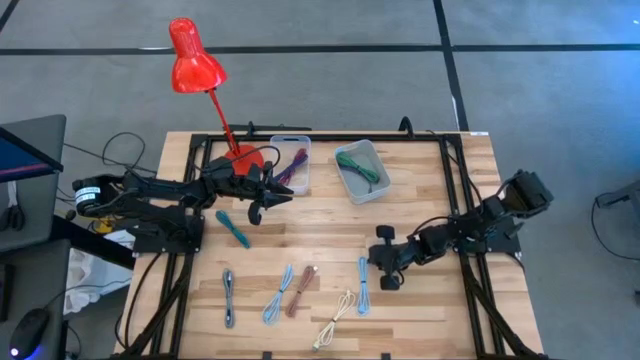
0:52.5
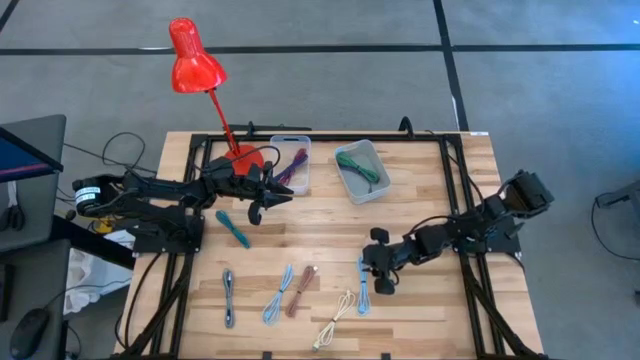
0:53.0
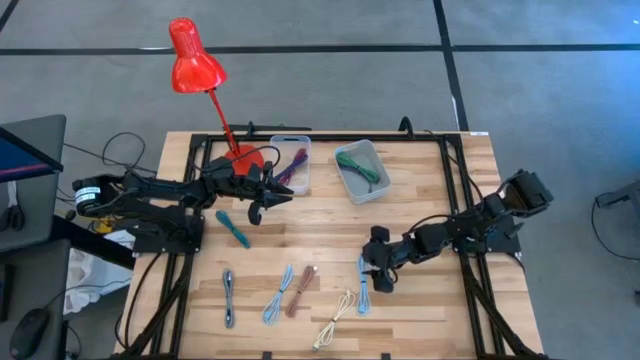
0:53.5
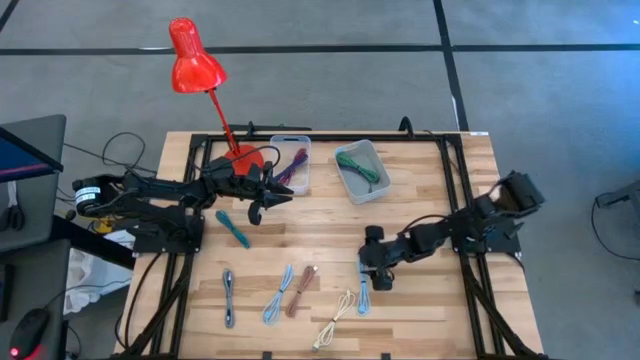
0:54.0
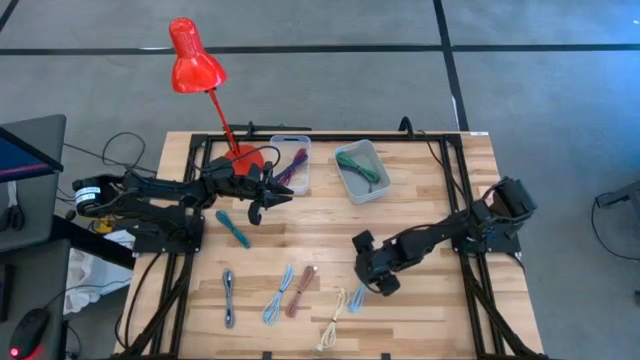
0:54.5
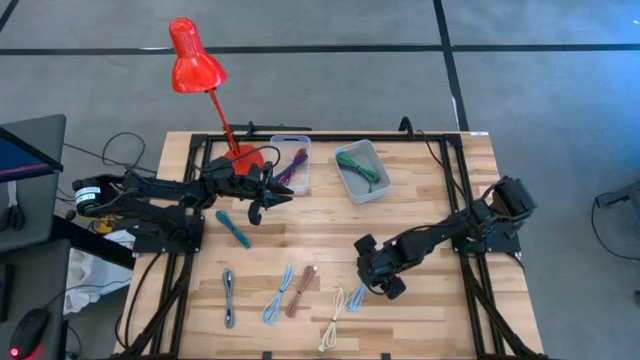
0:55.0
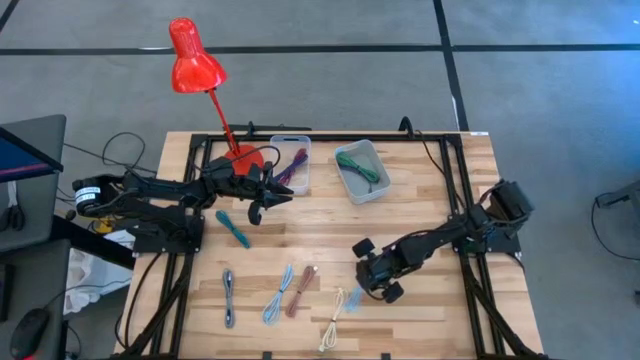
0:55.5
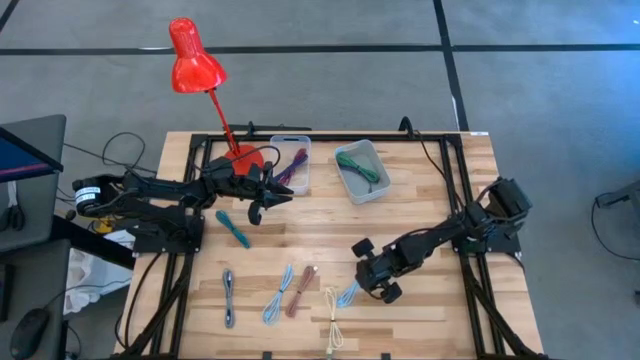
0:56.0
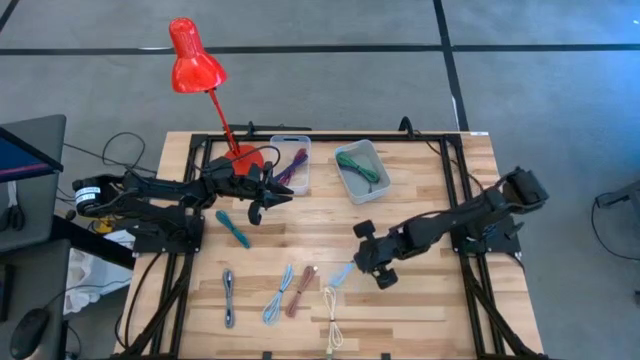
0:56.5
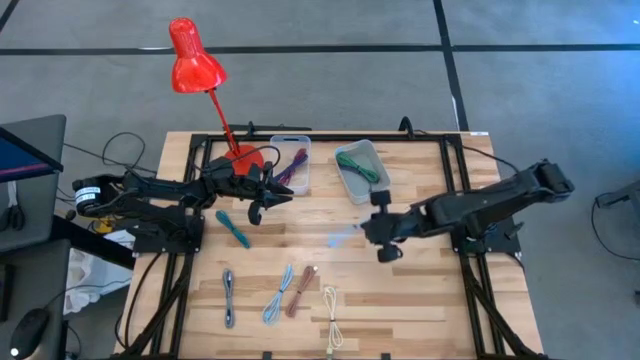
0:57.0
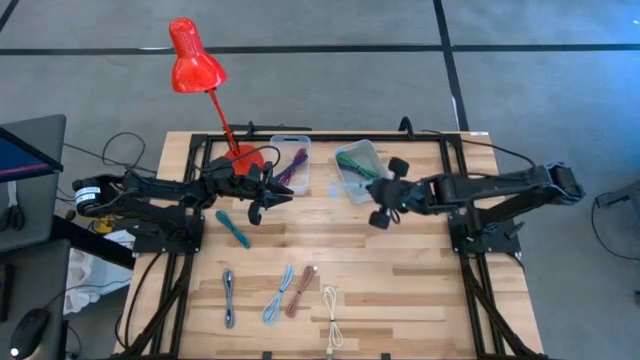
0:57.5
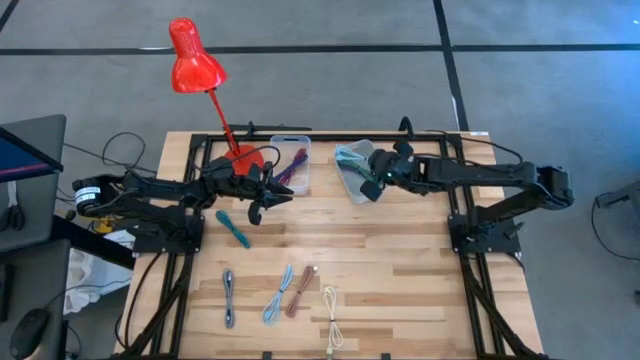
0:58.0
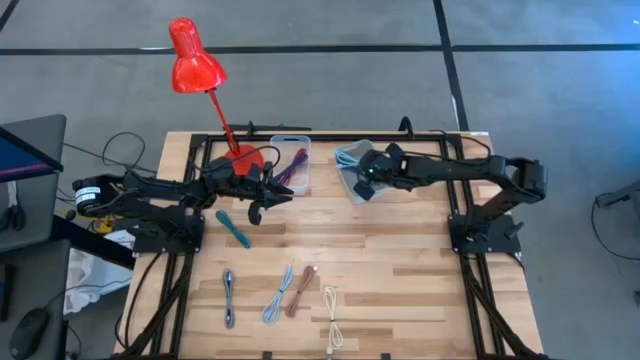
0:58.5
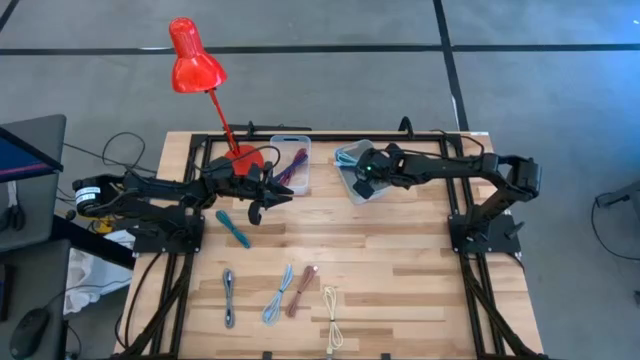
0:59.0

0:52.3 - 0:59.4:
Task: Pick & Place USB Port
Put the right light blue USB cable into the gray bin

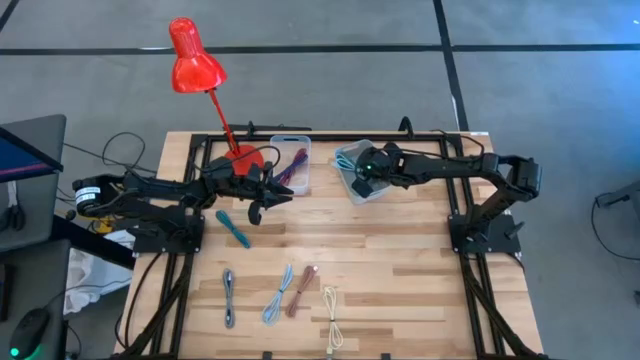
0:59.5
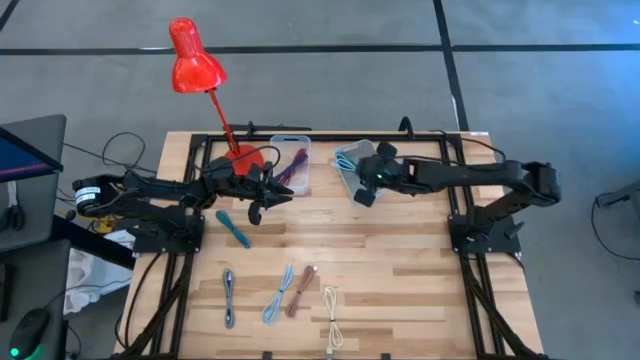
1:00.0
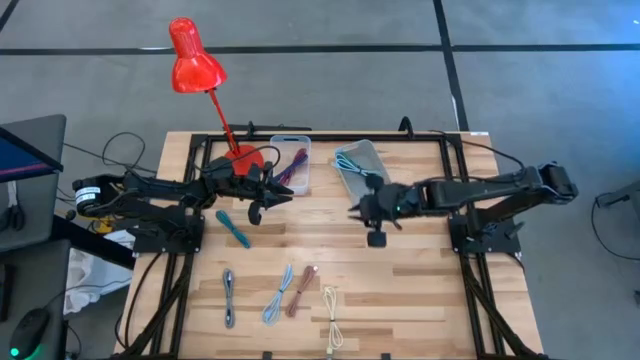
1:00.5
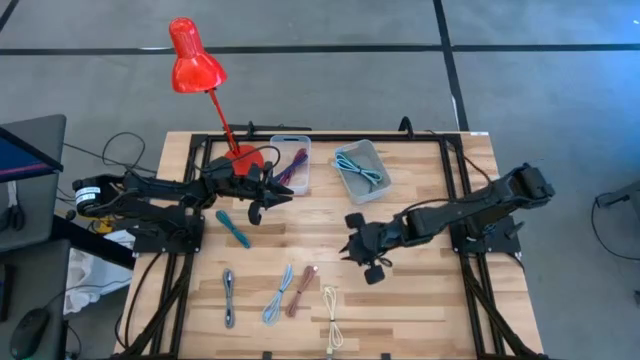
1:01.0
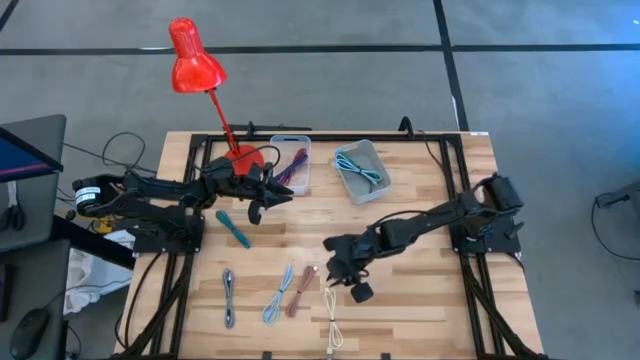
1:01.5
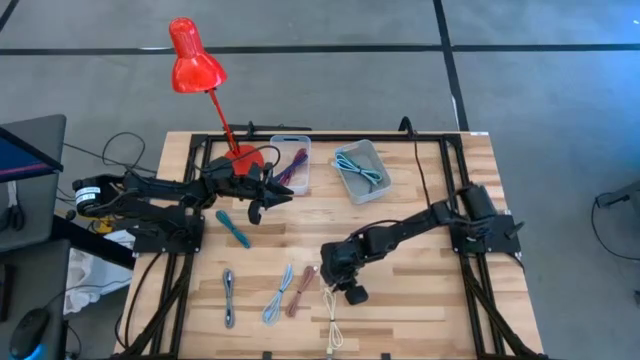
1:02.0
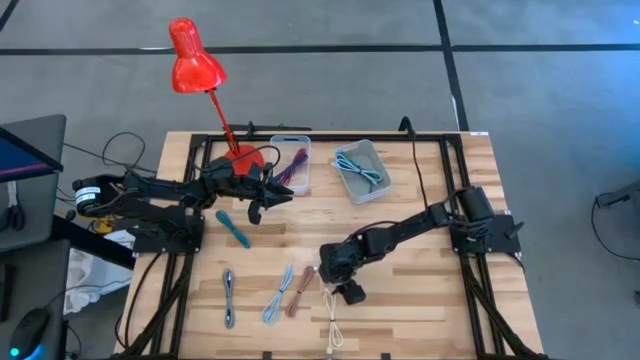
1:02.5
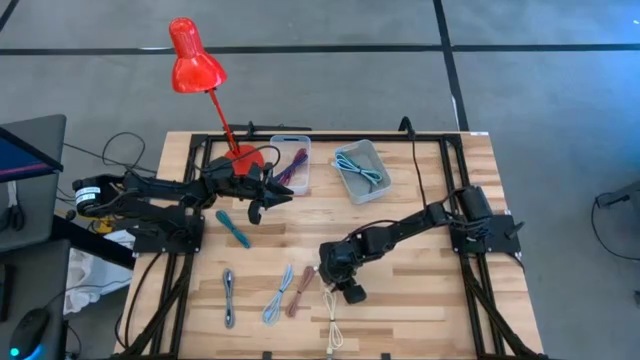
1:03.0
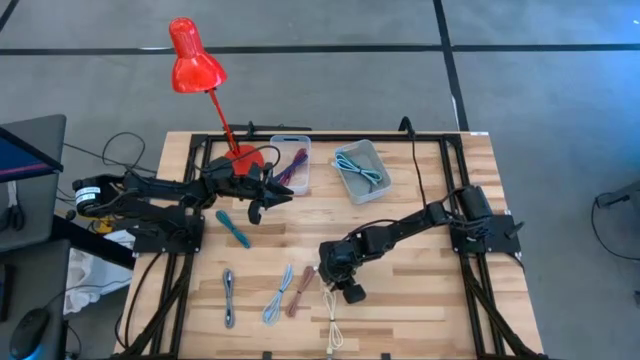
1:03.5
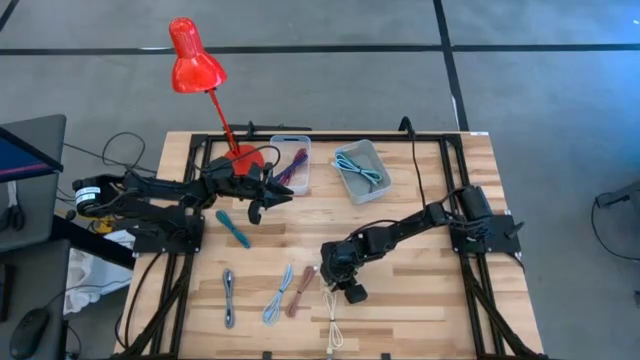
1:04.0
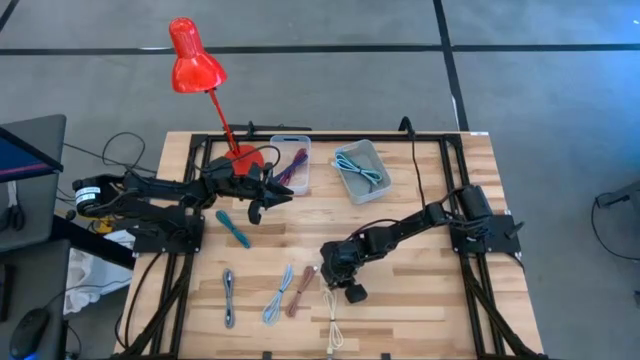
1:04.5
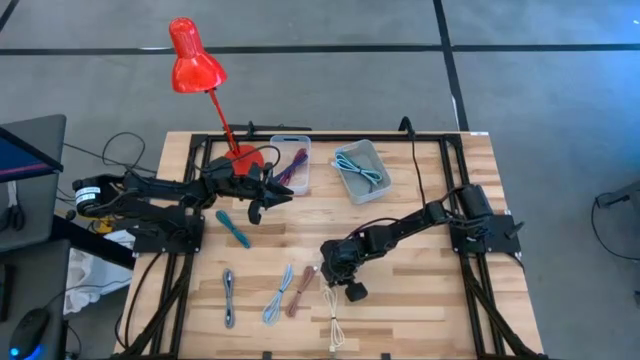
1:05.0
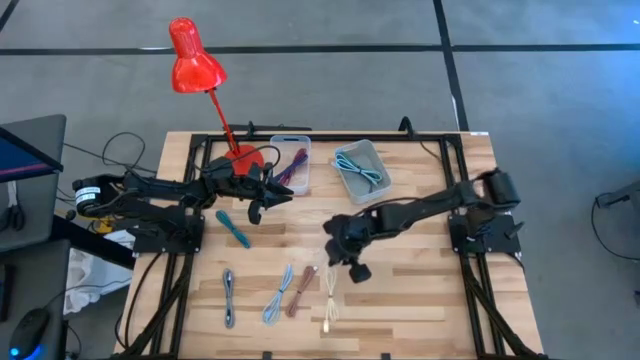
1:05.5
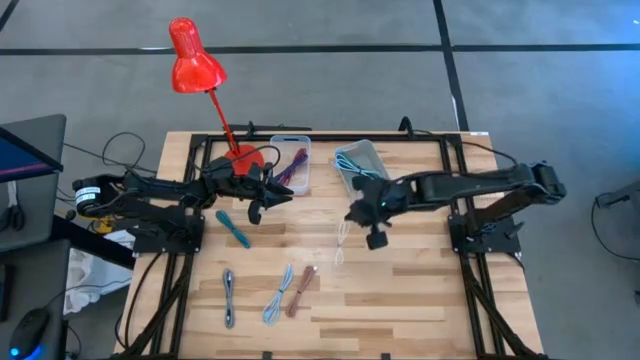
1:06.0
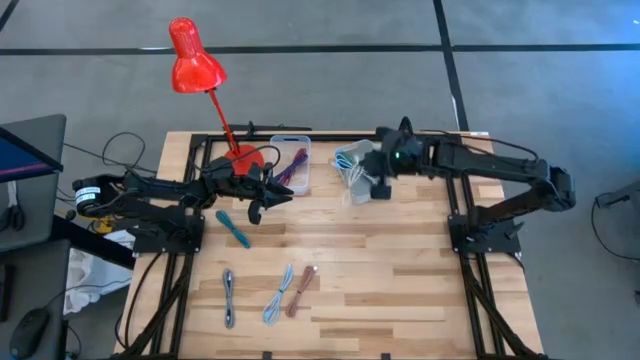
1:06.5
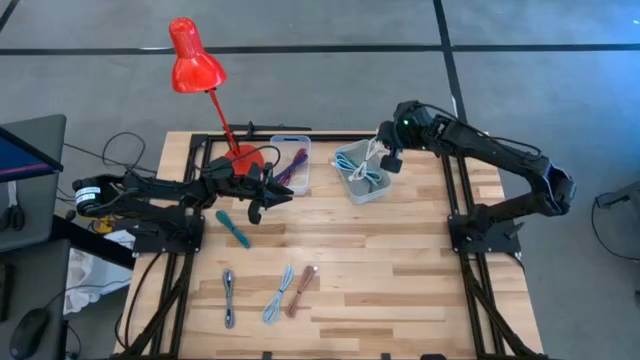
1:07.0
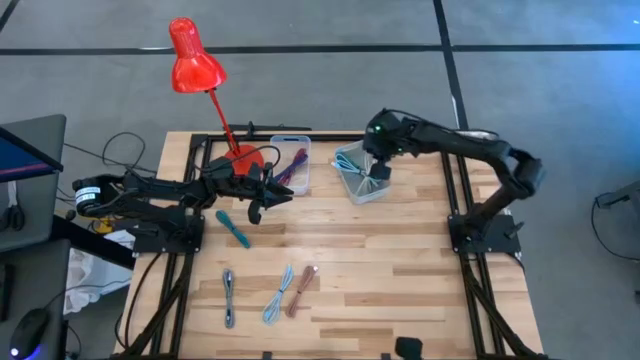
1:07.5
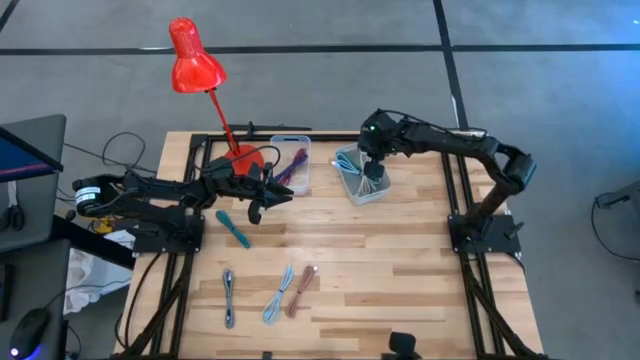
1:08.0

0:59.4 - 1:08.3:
Put the white USB cable into the gray bin

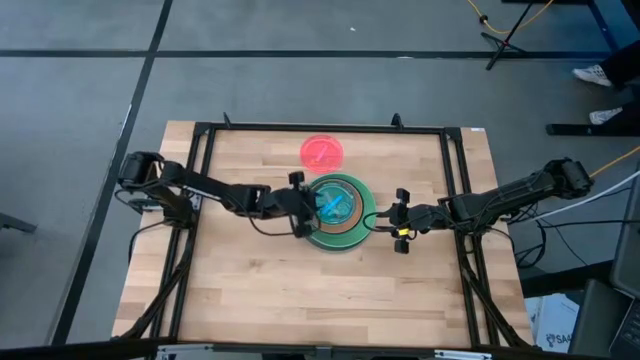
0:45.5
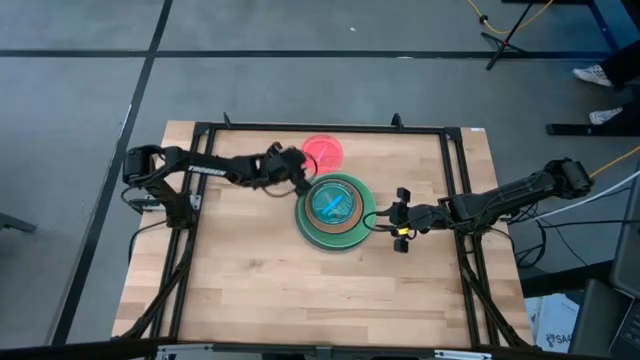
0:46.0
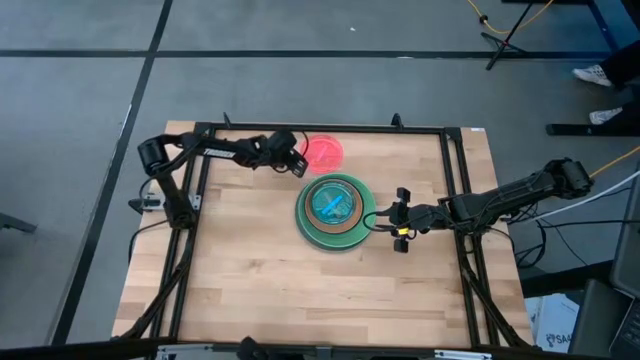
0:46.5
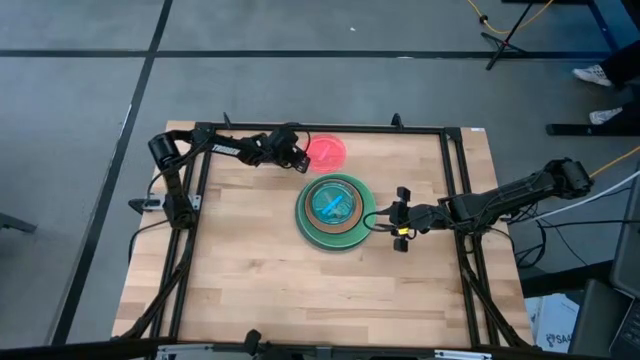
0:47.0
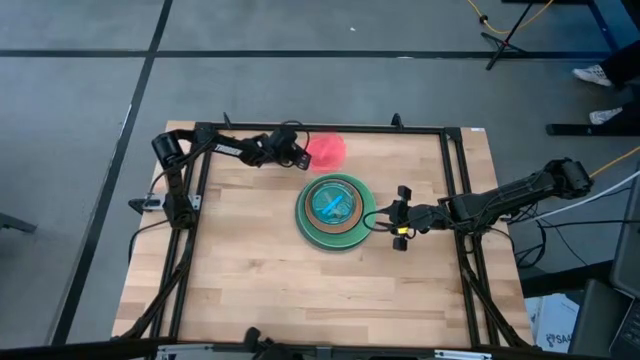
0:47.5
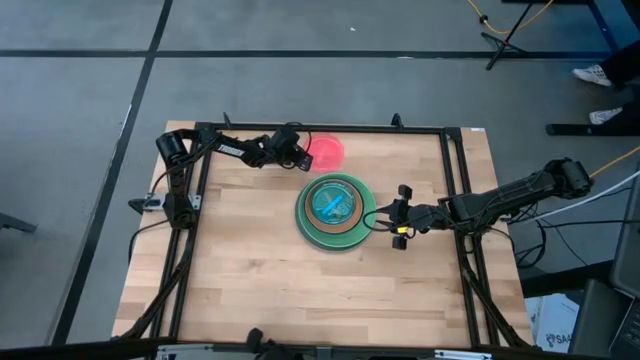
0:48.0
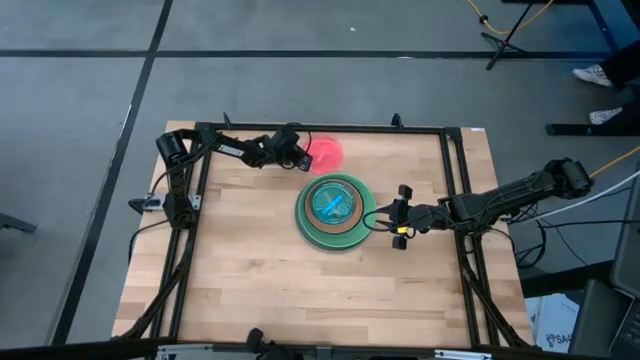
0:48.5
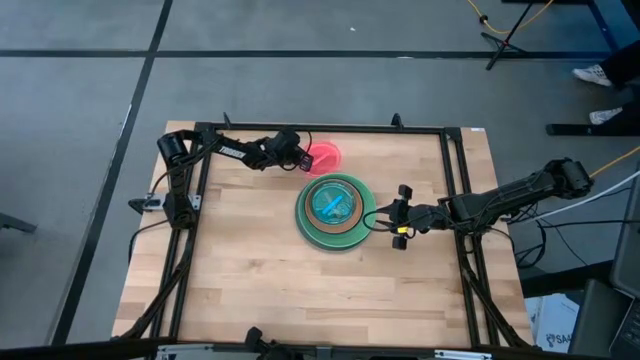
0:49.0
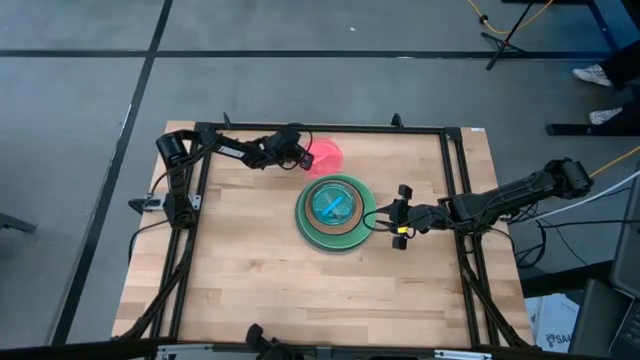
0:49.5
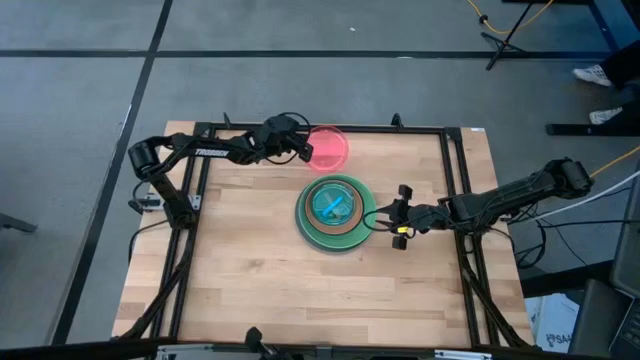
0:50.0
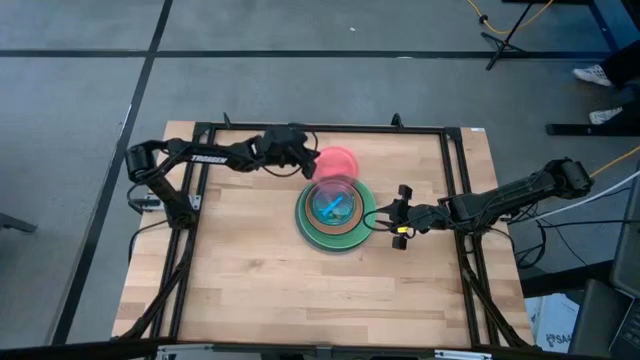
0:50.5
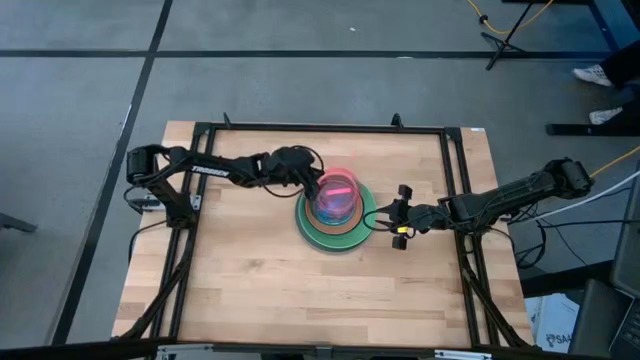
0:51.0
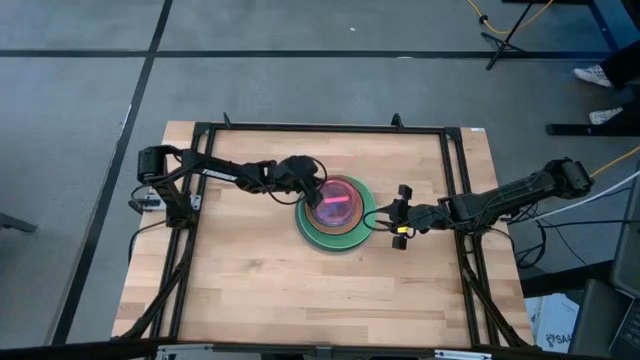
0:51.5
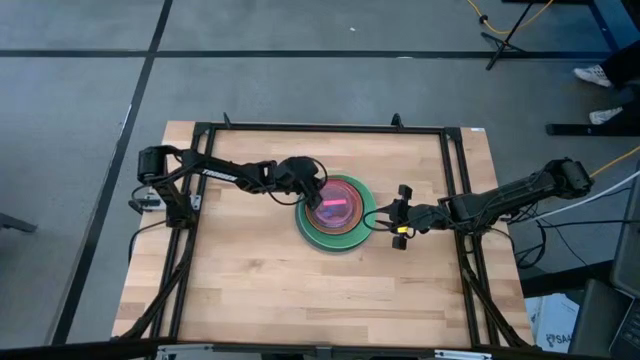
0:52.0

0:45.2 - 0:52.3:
Task: Stack plastic plates
Stack the pink plate on top of the blue plate
